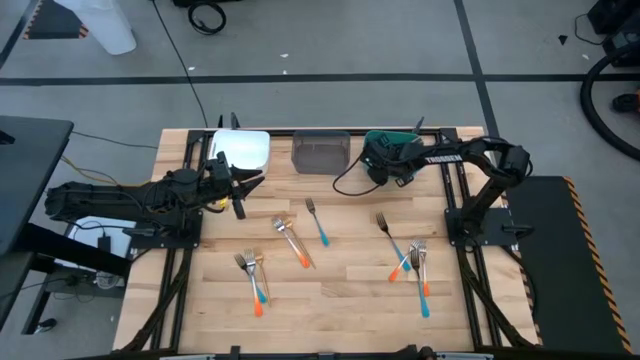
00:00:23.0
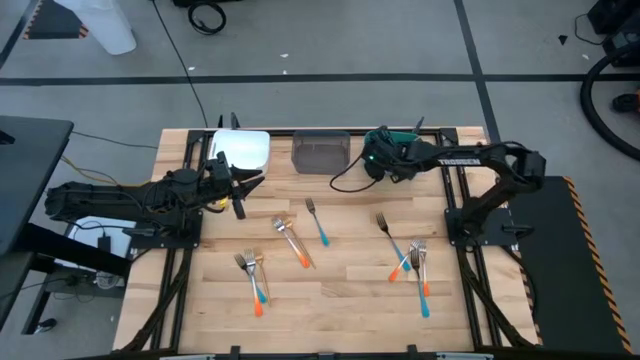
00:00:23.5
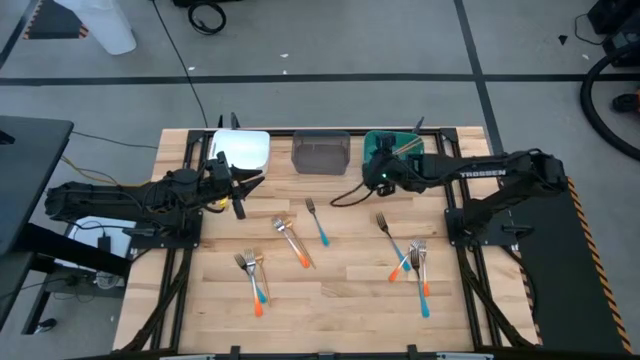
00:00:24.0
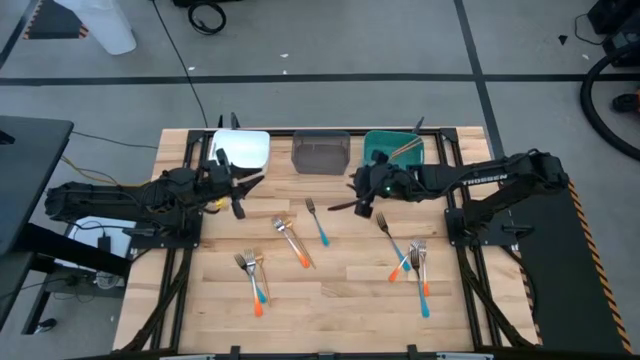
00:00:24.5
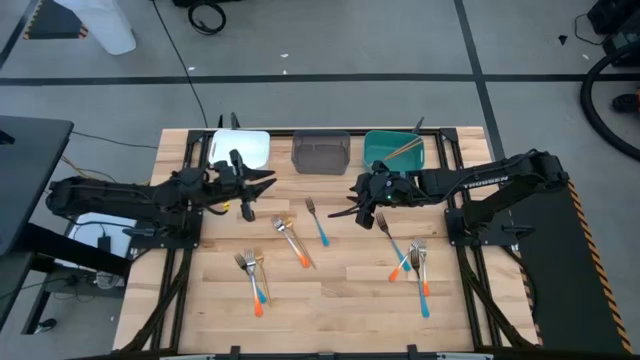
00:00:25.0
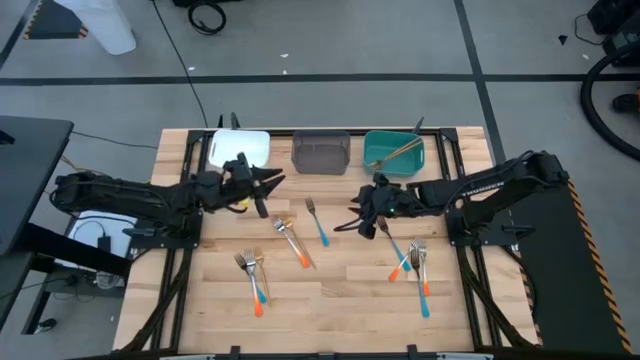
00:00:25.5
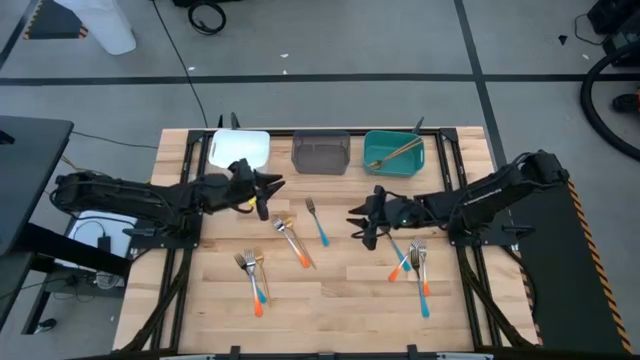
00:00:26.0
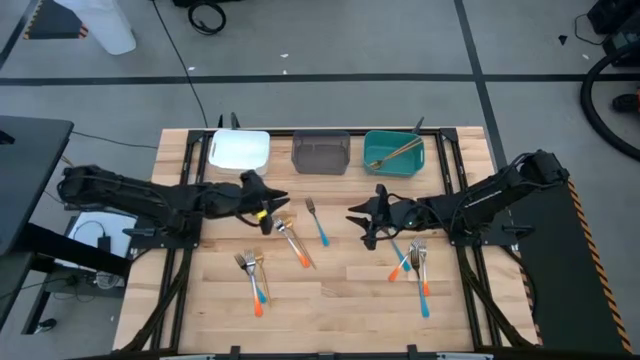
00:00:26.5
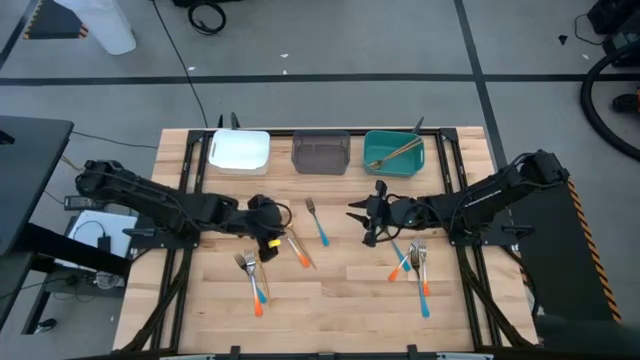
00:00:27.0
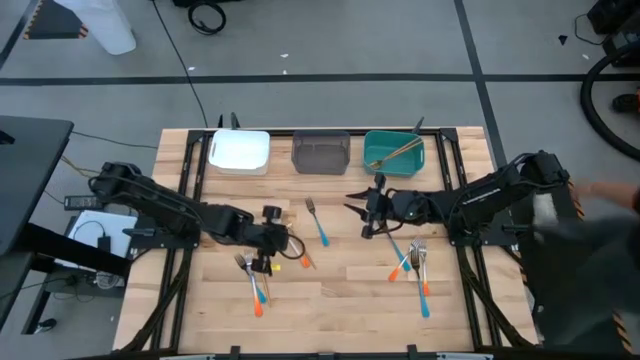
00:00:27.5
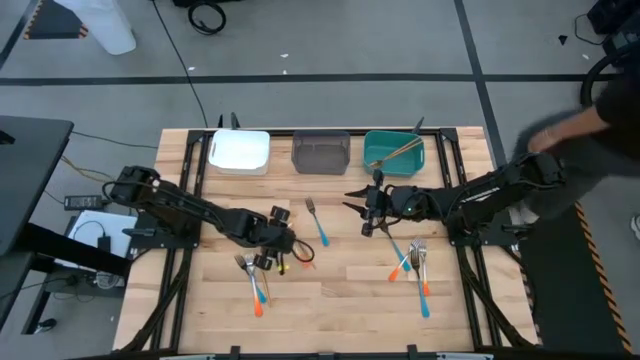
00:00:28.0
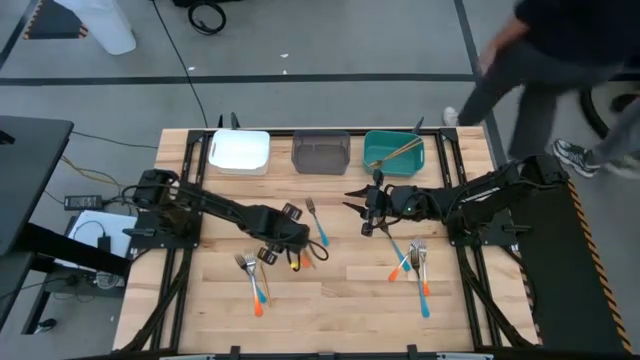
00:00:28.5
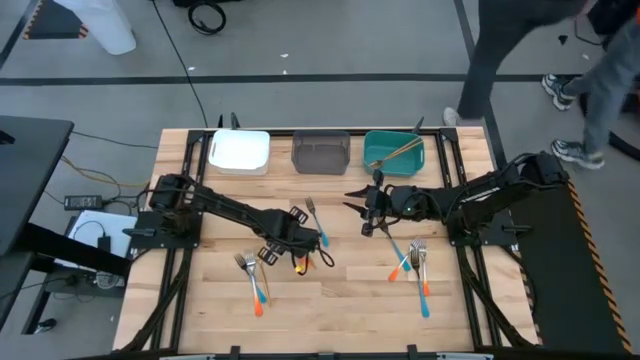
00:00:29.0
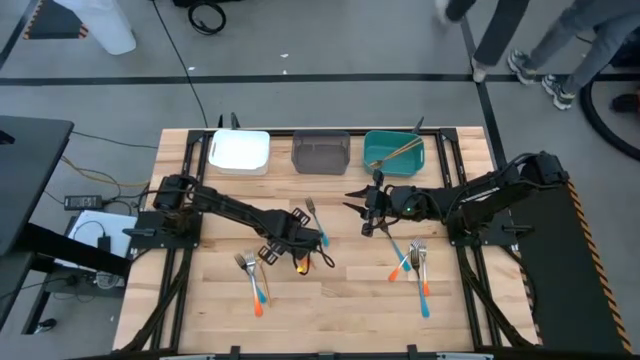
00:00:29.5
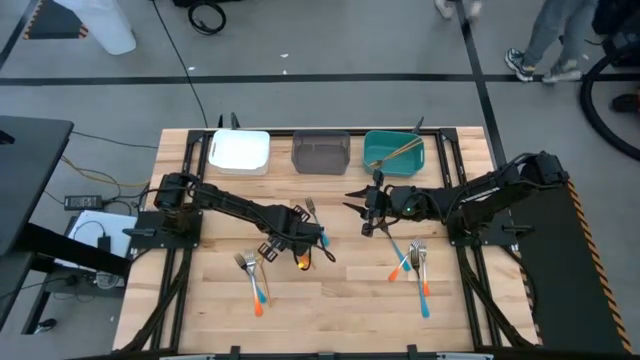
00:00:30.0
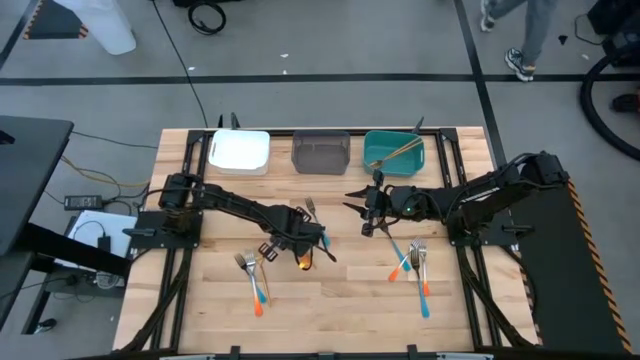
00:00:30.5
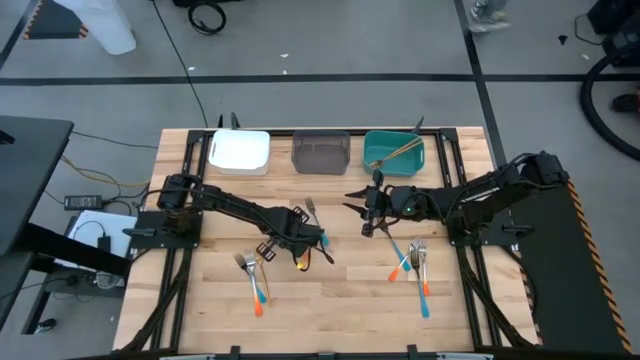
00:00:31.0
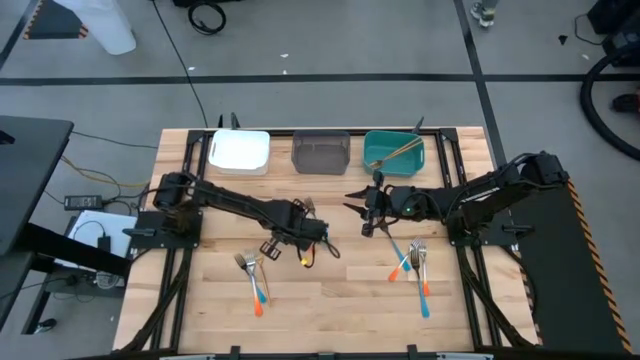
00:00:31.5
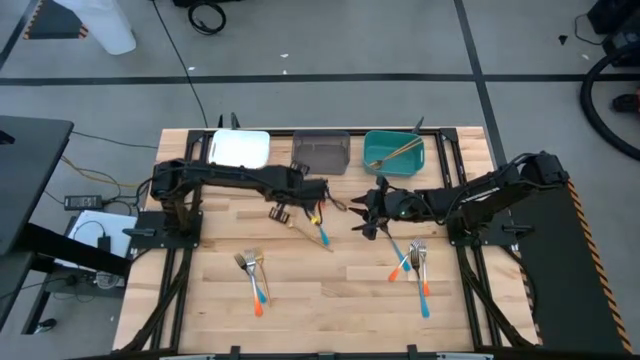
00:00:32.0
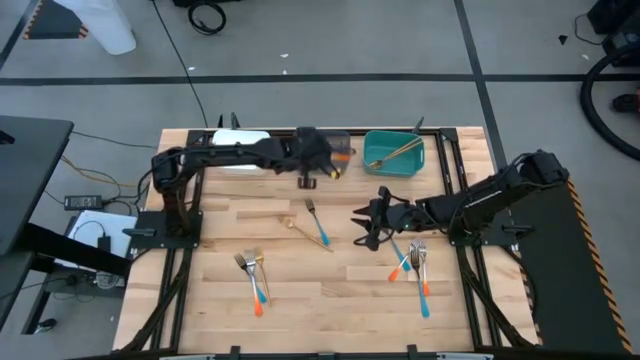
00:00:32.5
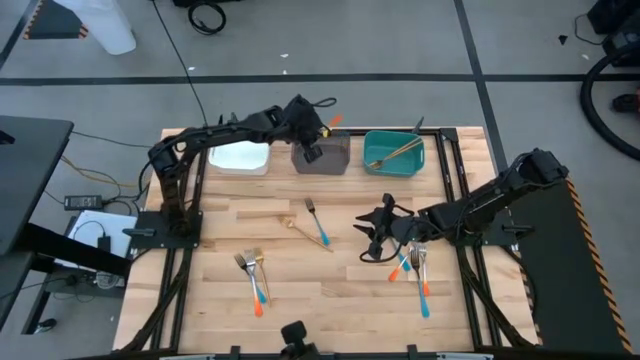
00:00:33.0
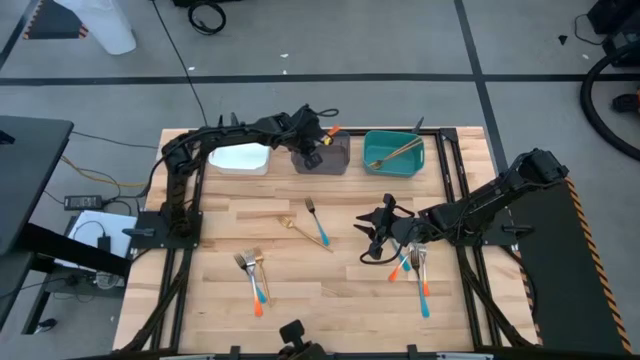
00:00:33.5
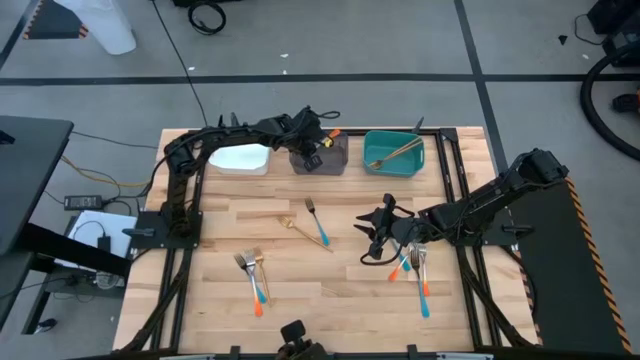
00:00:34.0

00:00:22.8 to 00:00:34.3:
Task: Sort silverware by color (type)
Put the orange fork into the black bin

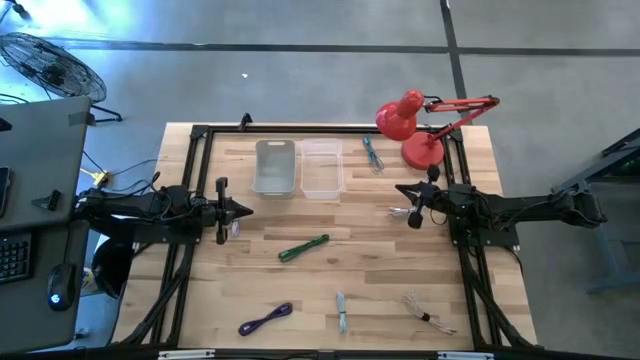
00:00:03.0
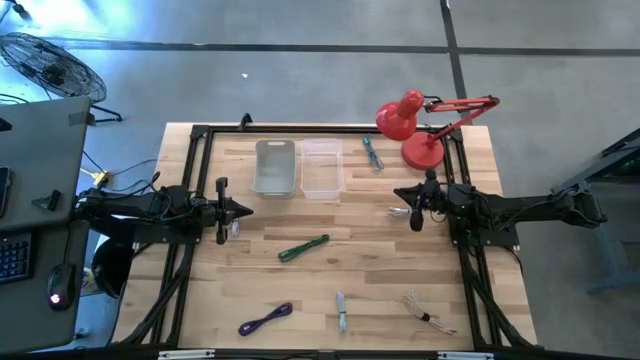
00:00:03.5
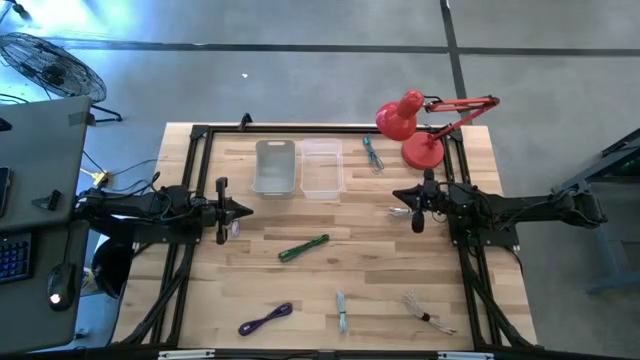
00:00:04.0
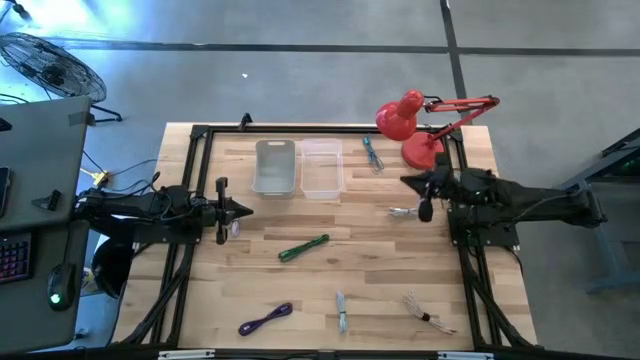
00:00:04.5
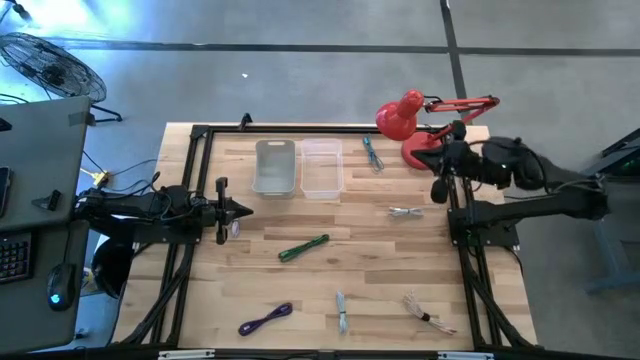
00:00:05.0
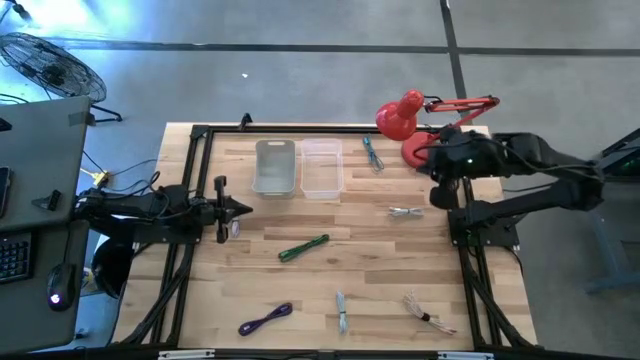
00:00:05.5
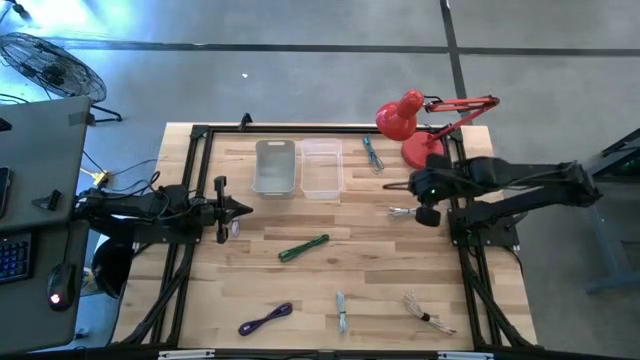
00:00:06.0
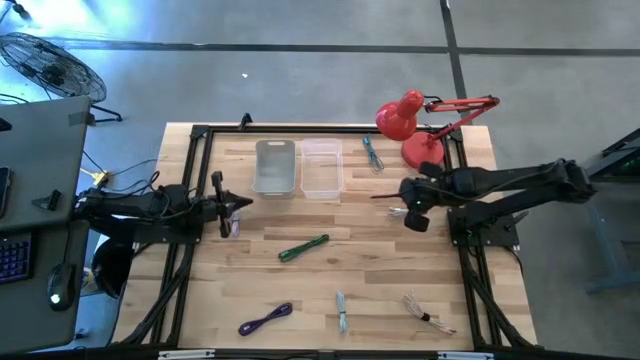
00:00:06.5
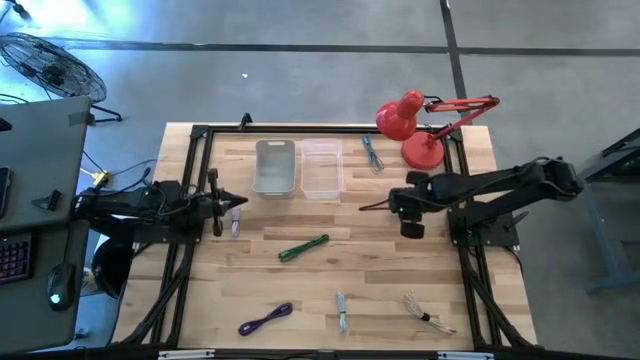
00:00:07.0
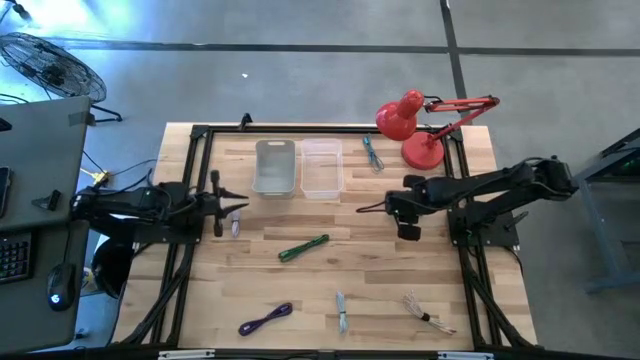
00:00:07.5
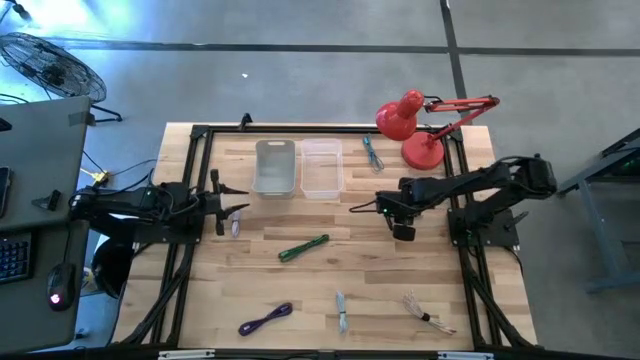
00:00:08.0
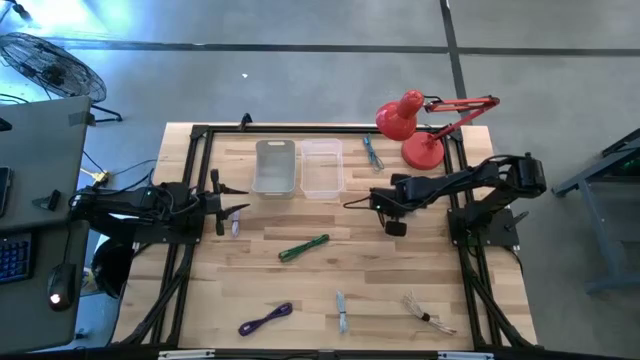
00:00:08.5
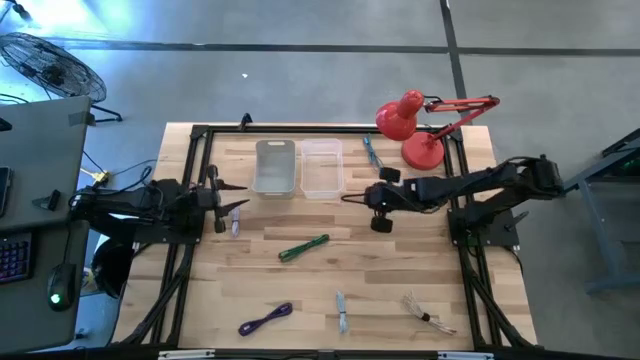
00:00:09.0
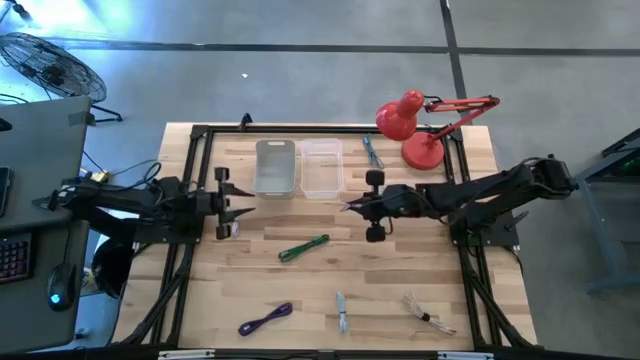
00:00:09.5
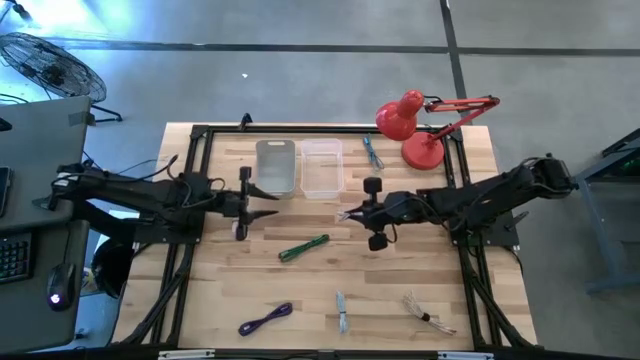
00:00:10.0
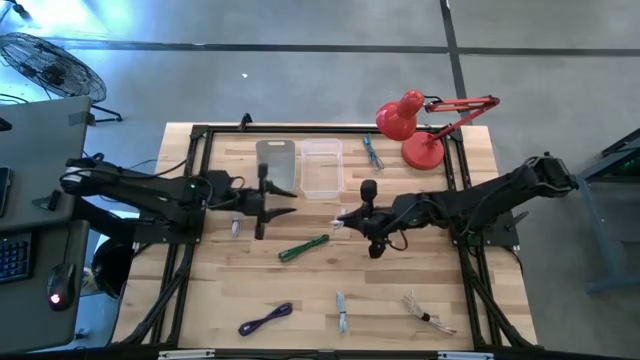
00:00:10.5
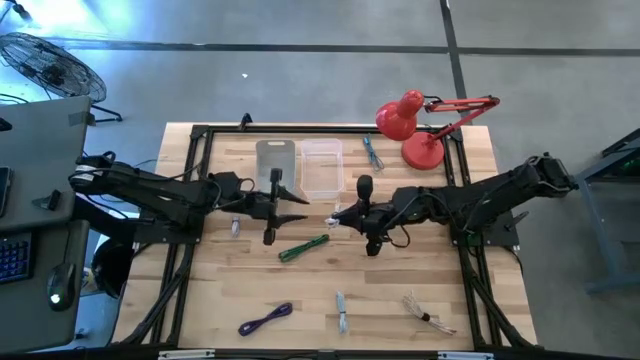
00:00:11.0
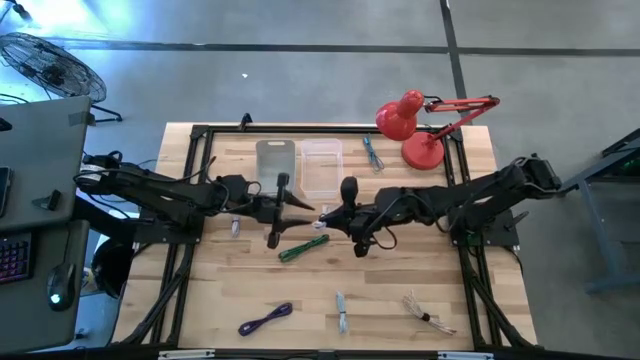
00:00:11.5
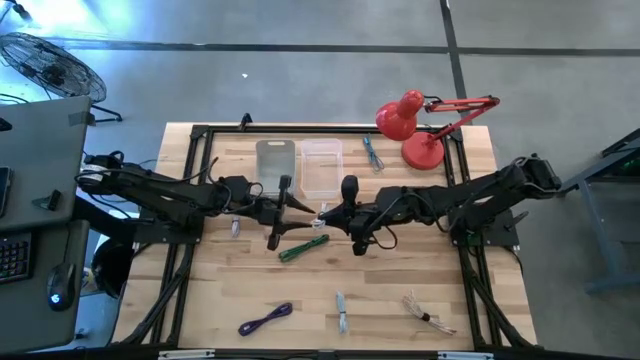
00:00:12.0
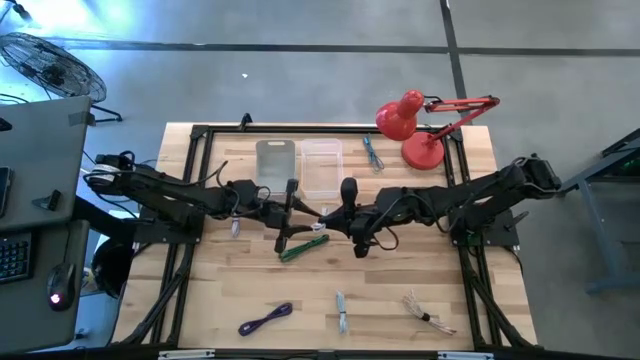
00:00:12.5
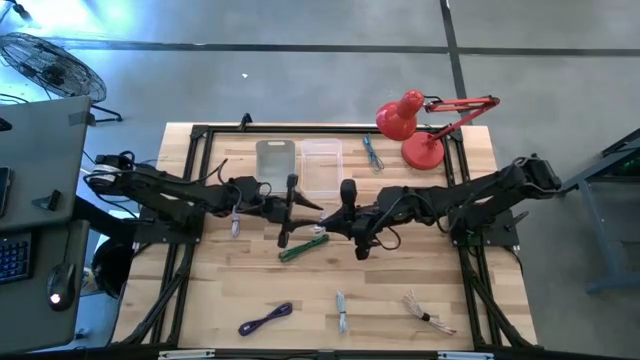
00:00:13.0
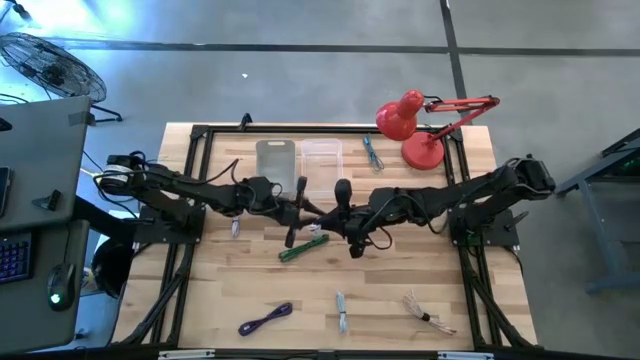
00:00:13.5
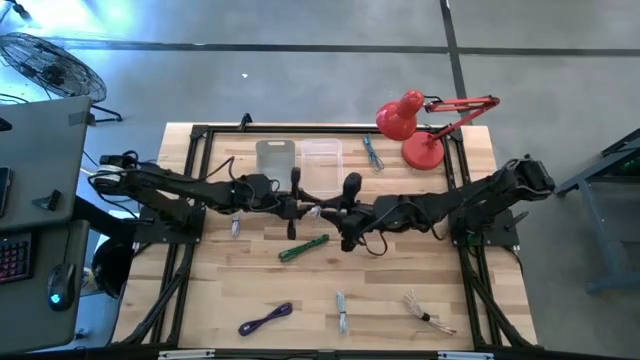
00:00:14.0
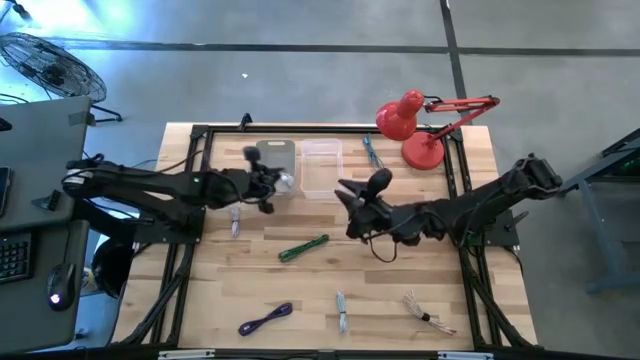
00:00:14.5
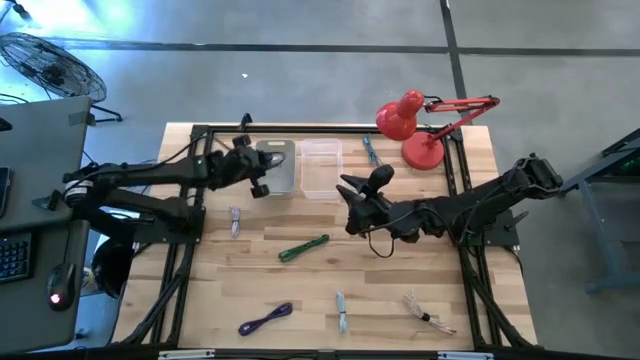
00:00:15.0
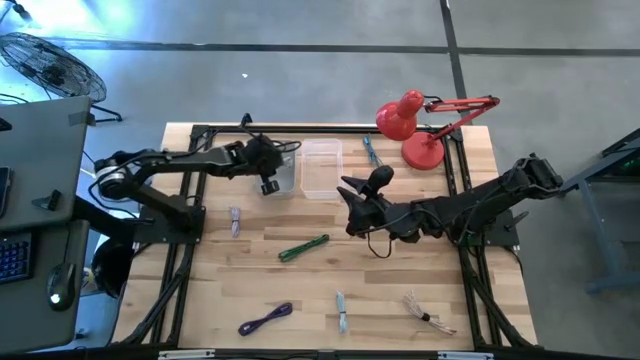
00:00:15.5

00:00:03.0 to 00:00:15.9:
Task: Pick & Place USB Port
Put the top right white charger cable into the gray bin
